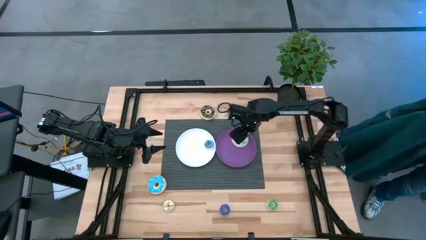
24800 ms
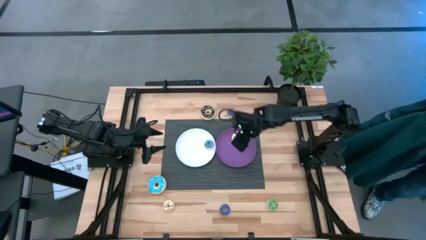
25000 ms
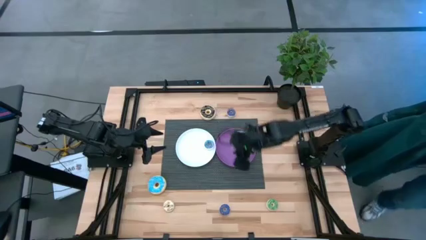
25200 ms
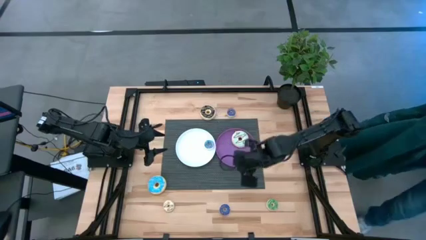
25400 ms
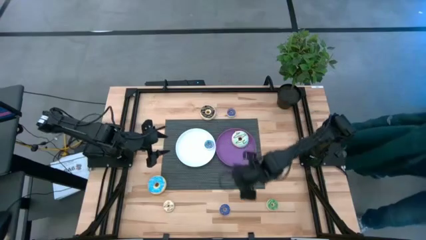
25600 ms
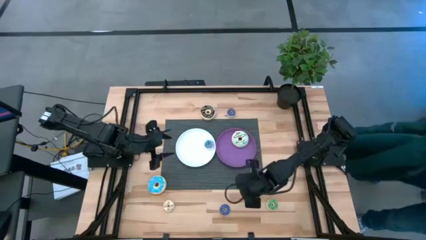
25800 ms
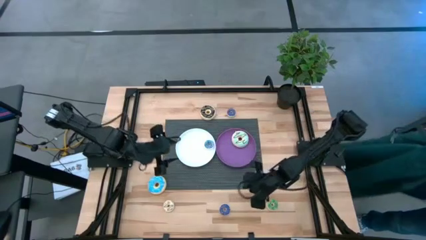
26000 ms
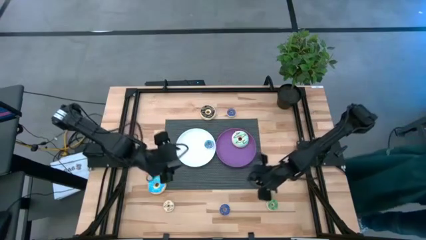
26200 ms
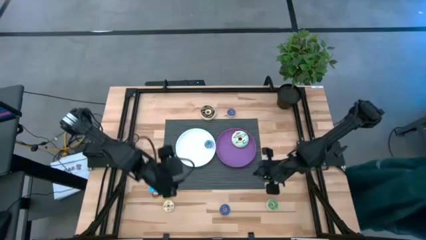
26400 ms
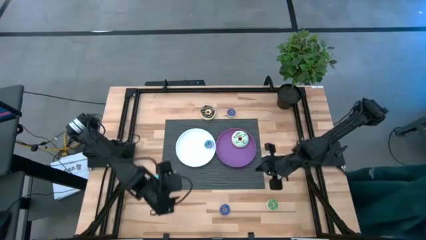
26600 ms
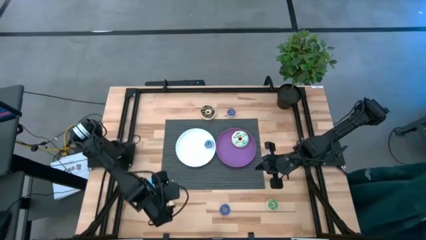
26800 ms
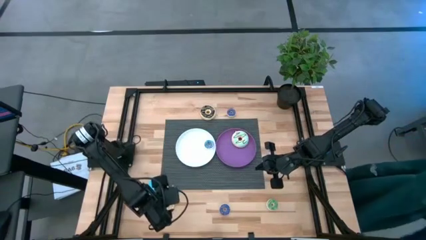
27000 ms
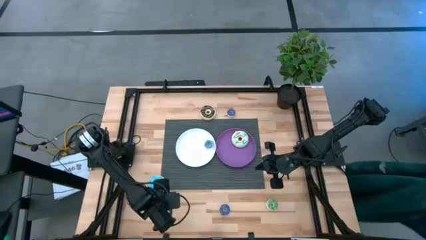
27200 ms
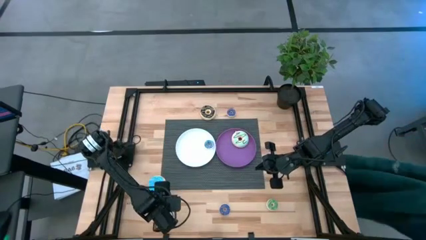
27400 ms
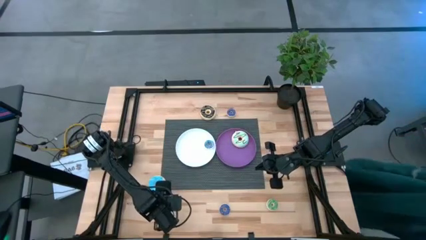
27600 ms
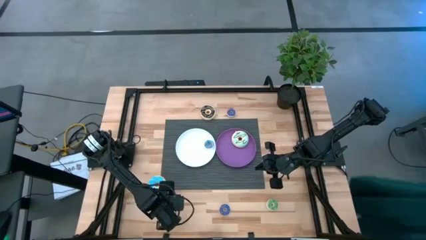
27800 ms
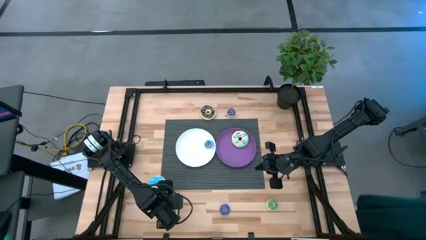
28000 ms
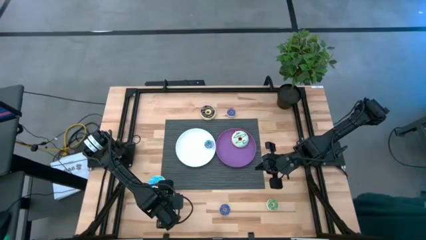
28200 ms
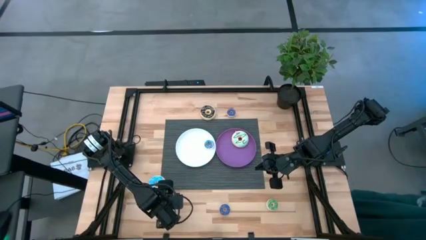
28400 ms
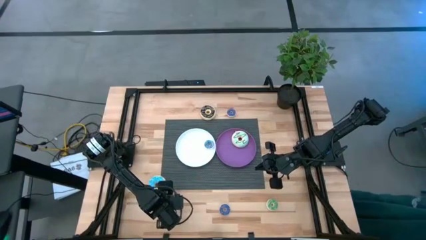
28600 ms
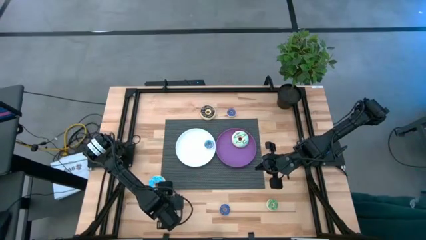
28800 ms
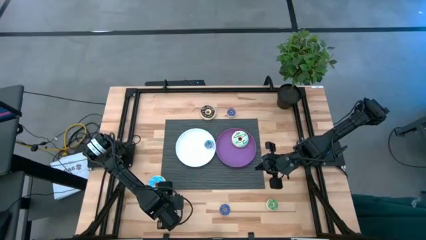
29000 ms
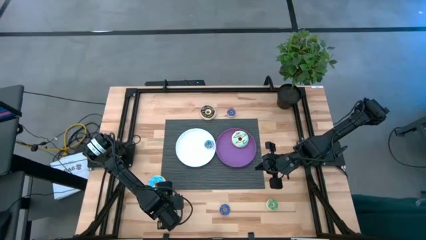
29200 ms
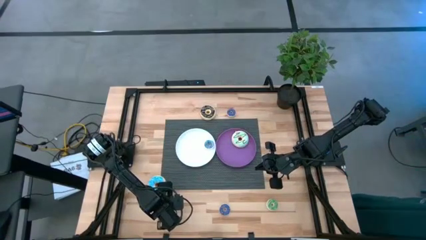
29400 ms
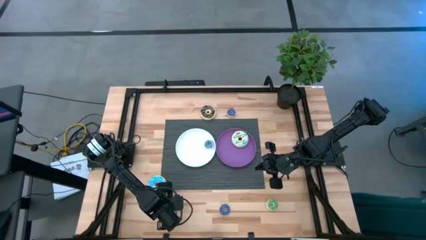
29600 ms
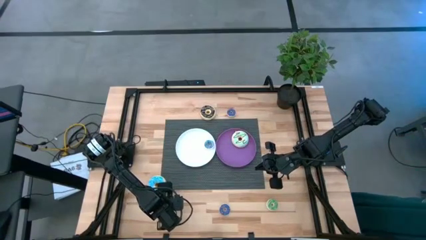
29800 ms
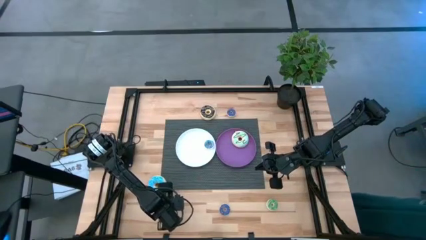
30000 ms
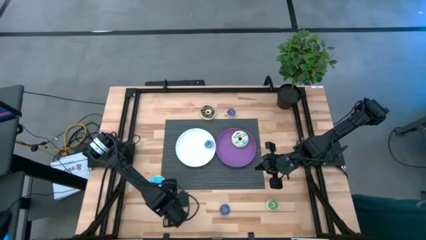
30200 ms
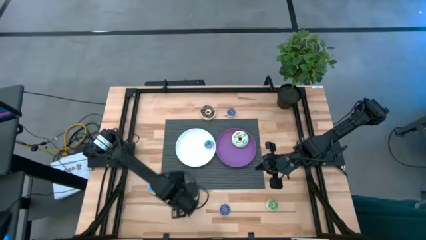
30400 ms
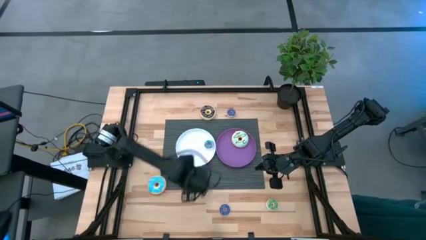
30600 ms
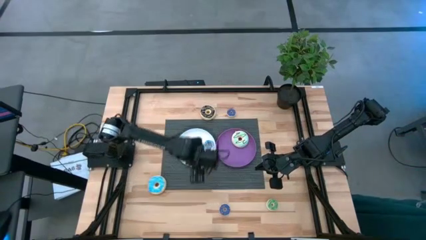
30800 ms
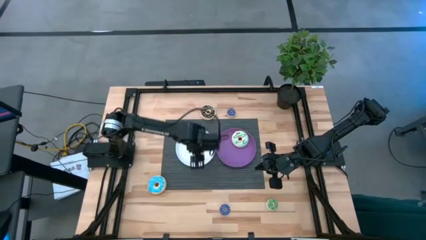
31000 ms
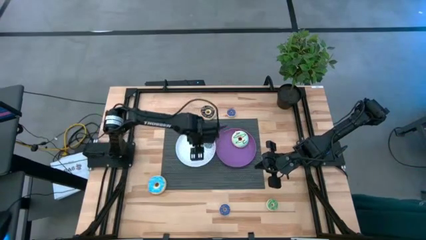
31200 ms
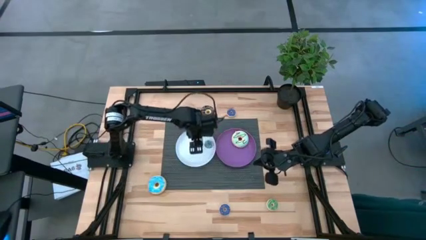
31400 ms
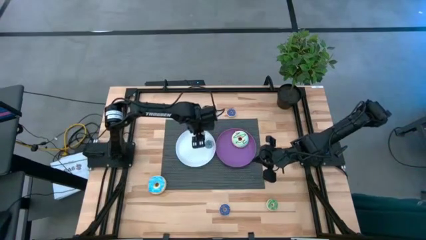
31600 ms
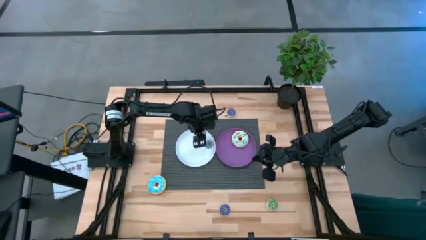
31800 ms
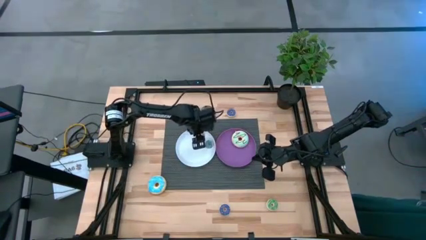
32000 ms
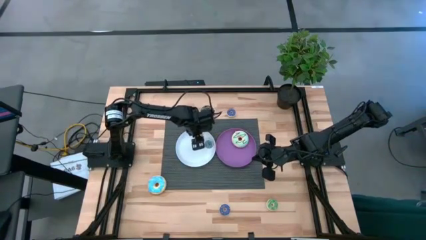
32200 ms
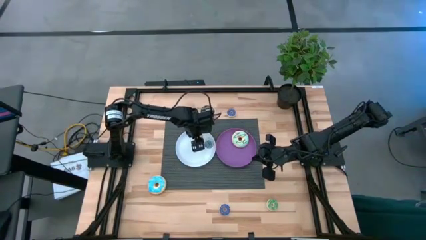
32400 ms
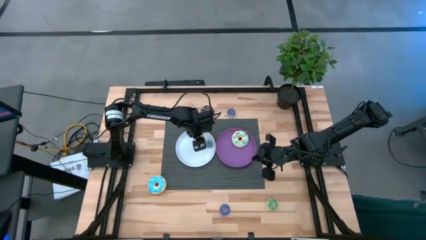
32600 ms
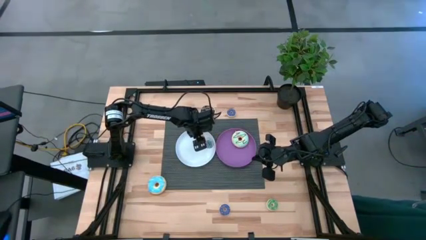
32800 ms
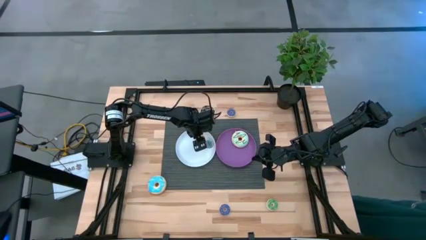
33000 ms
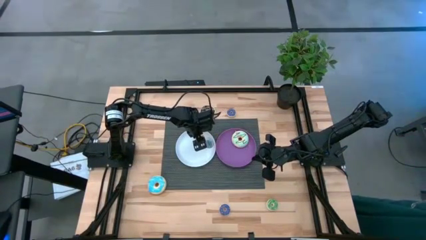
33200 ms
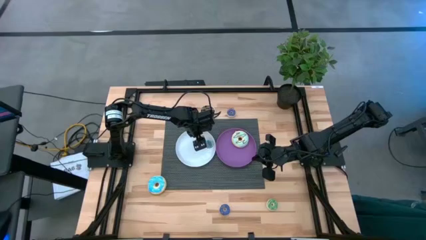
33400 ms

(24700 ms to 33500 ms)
Task: Pick & Place donuts
Put the small white donut on the white plate

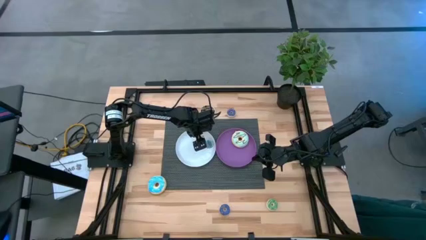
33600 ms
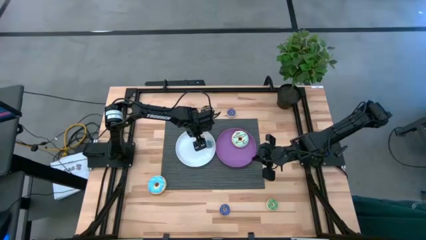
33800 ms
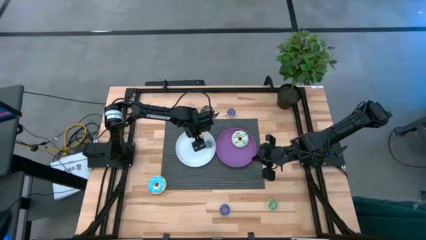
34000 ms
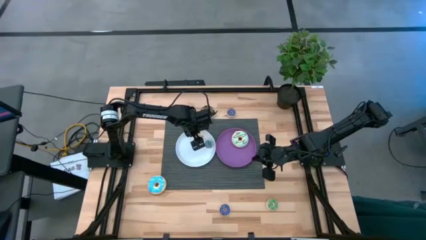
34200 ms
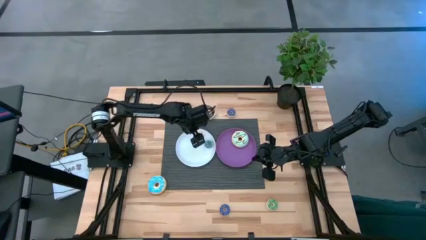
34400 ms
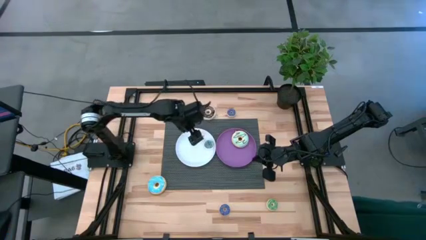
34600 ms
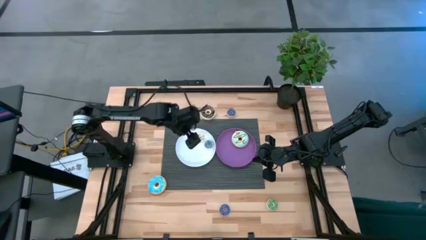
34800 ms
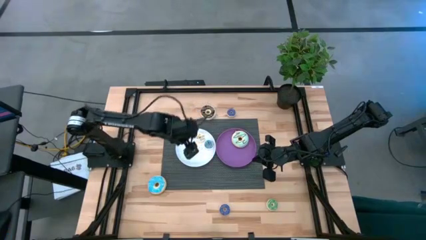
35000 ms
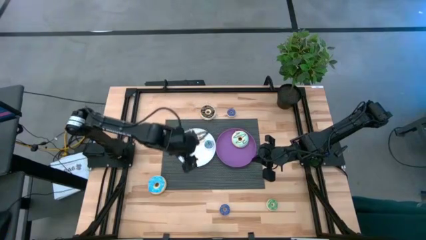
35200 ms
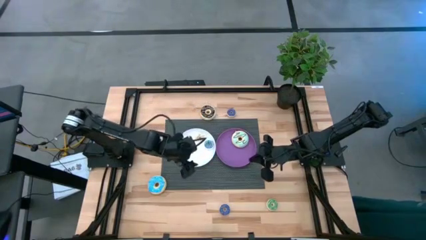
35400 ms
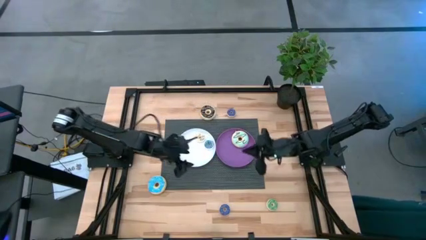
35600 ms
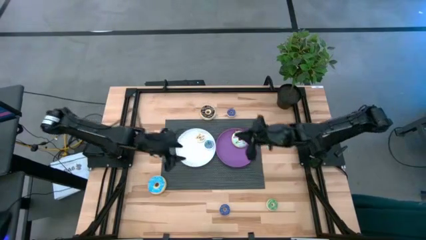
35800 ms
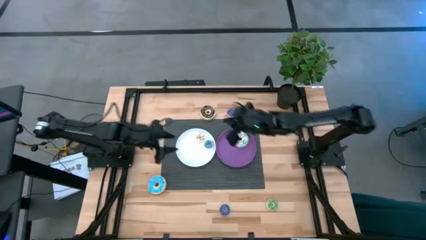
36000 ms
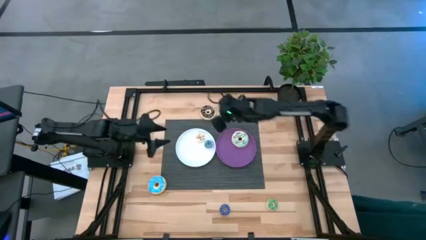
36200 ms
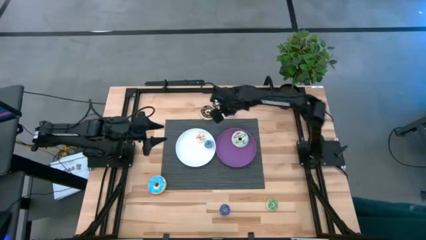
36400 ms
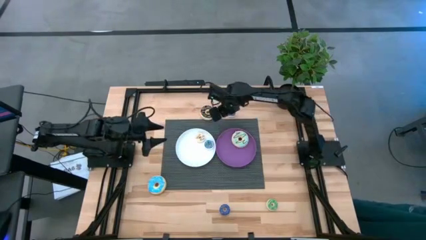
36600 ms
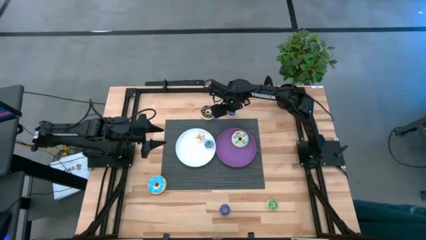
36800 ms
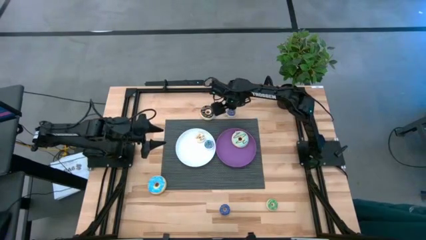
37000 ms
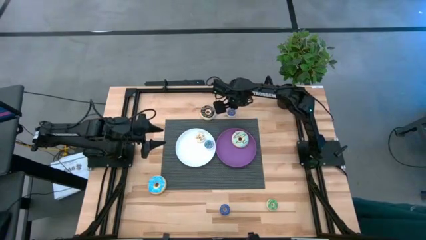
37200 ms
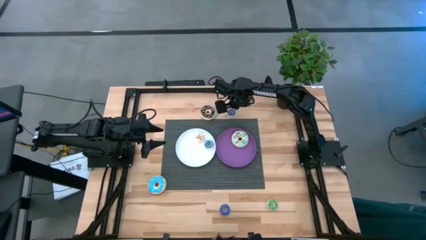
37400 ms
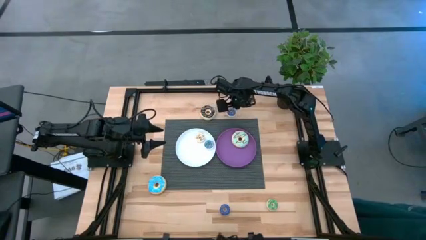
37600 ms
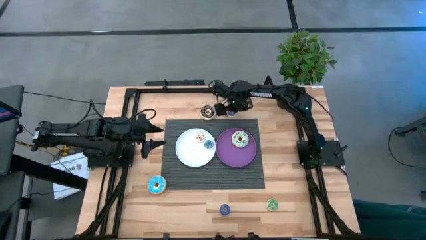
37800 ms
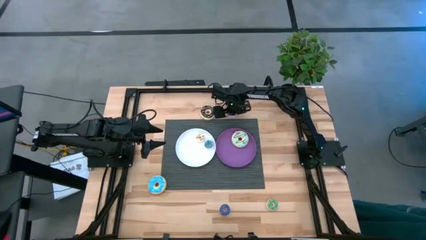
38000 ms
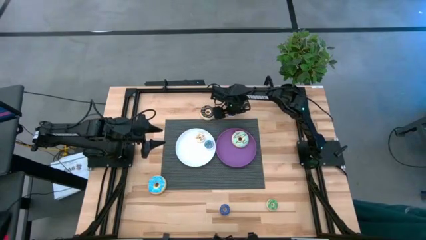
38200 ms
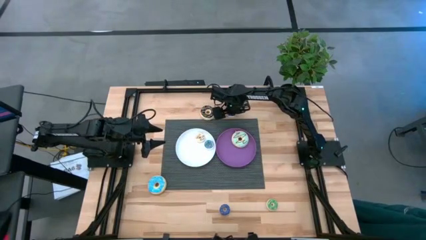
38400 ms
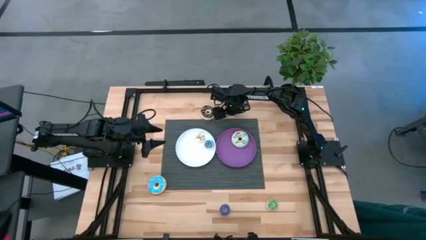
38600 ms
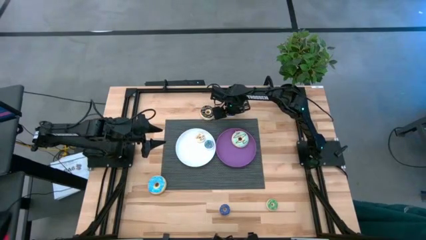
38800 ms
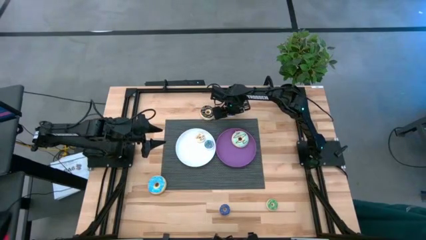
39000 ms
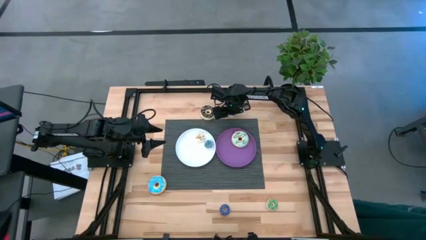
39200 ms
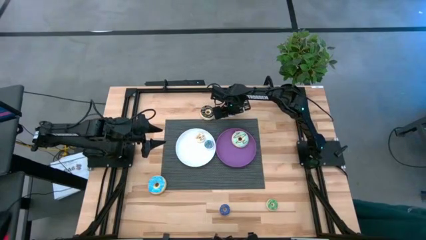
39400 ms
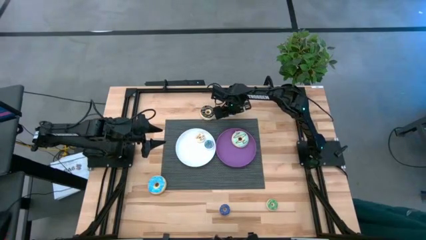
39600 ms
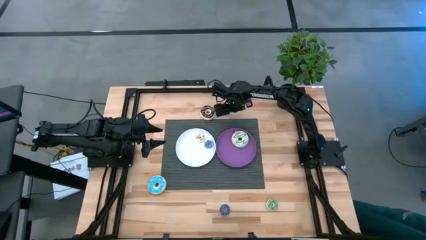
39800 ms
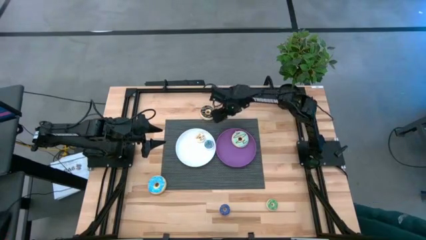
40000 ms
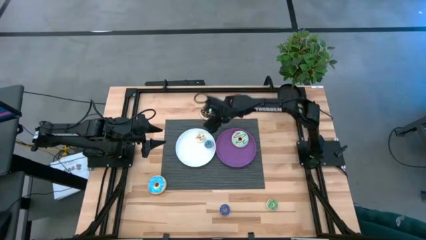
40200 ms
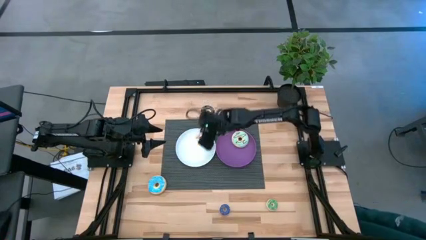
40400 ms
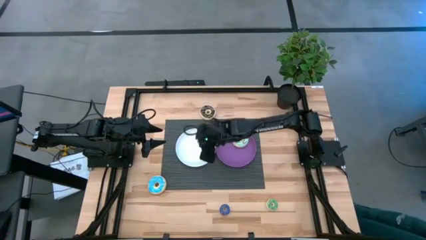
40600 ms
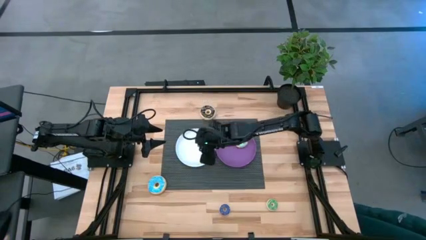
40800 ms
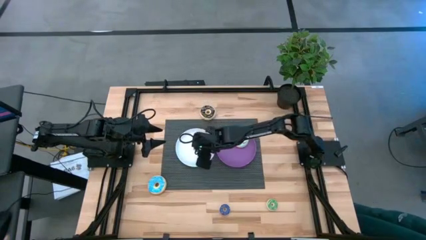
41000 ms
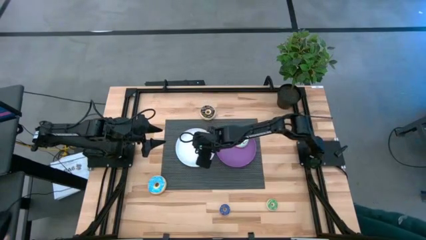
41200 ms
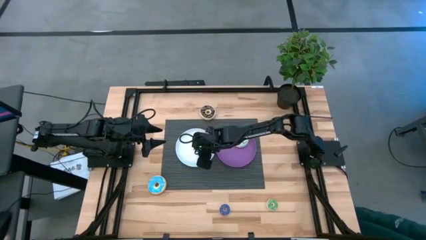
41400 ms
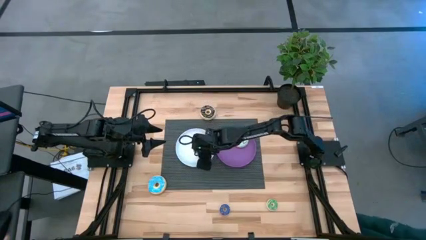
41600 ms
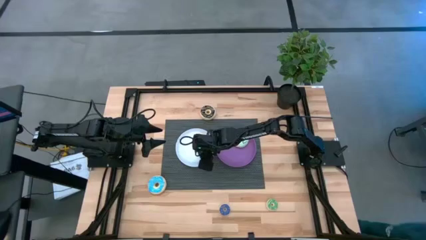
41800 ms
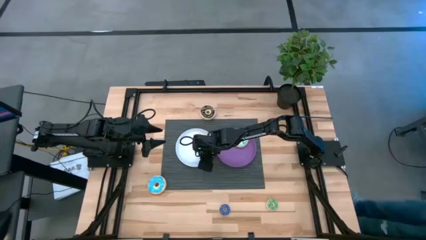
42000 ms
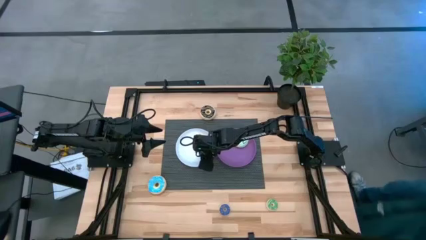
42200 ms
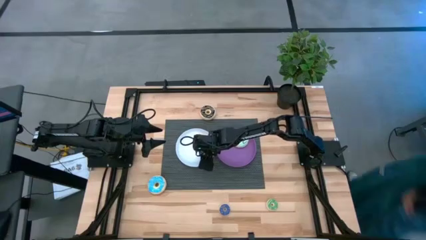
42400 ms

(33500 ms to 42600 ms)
Put the top small dark blue donut on the white plate
